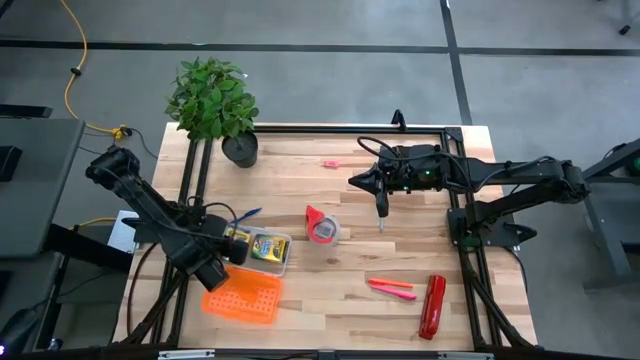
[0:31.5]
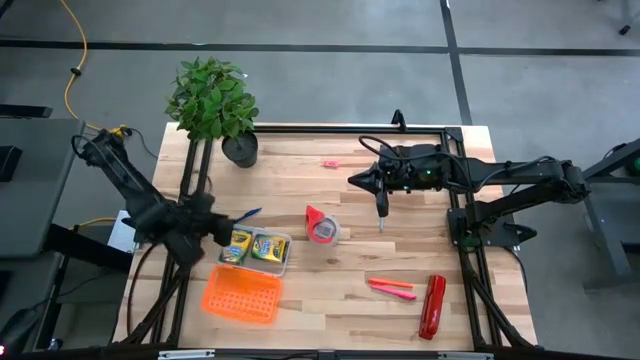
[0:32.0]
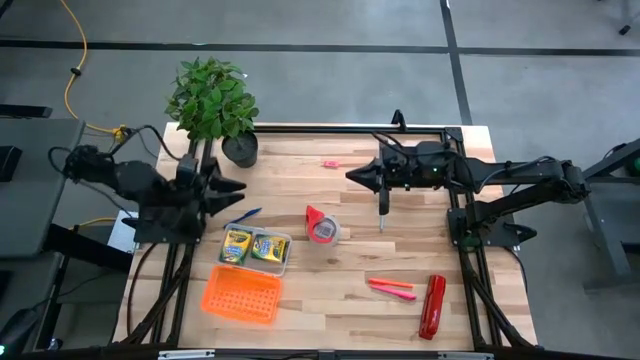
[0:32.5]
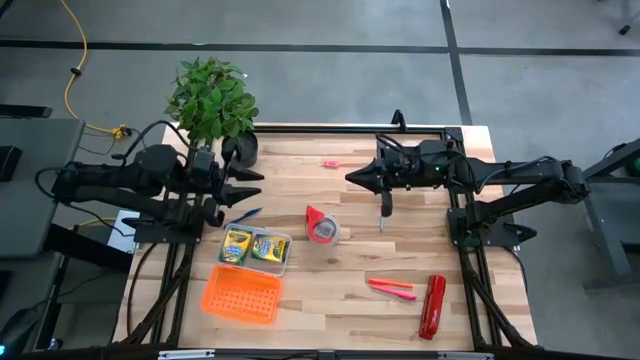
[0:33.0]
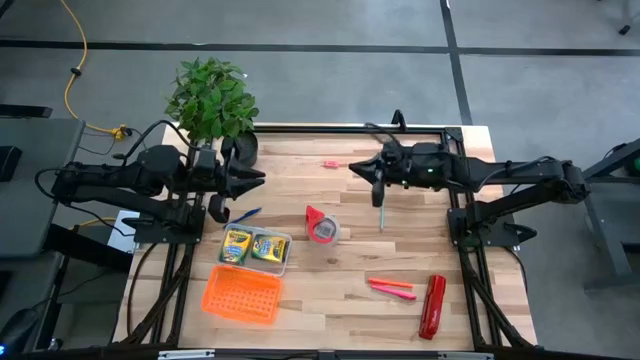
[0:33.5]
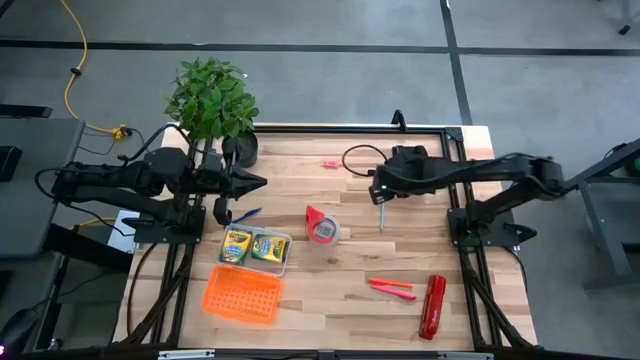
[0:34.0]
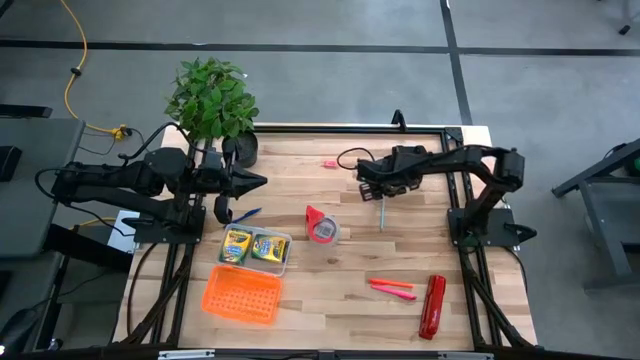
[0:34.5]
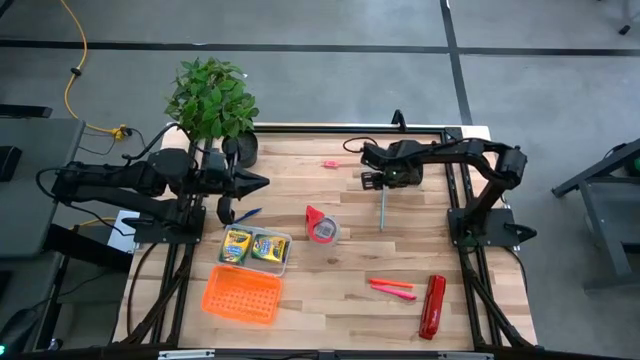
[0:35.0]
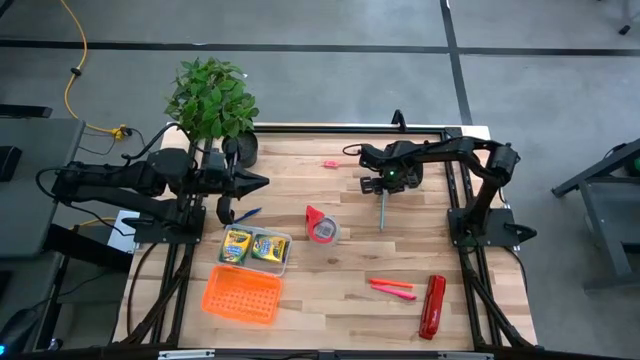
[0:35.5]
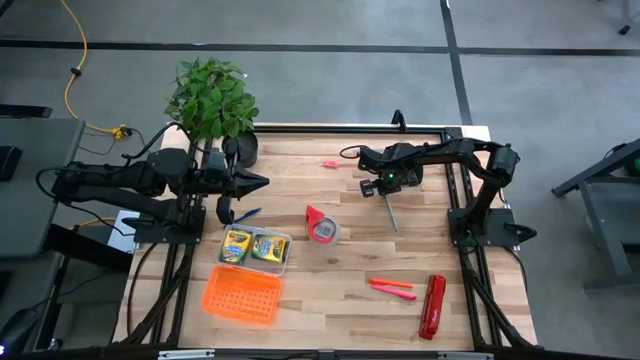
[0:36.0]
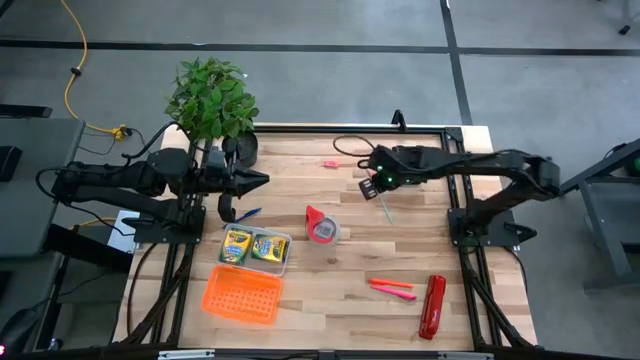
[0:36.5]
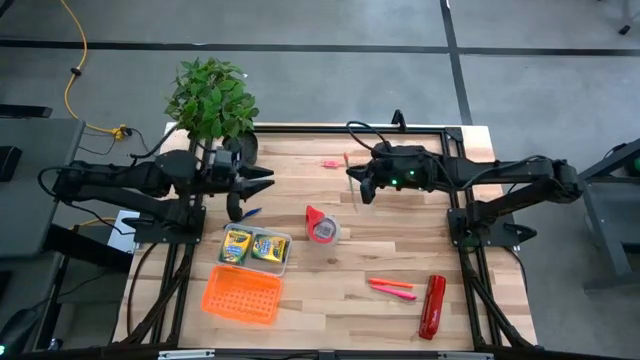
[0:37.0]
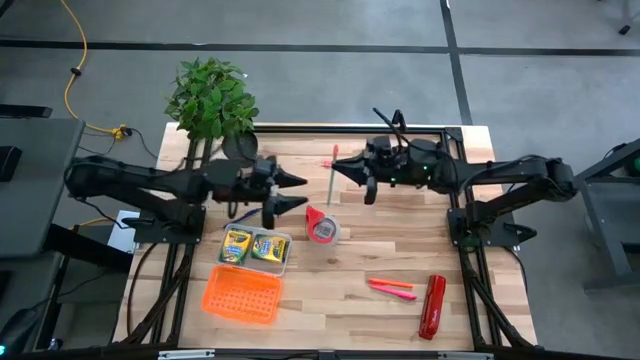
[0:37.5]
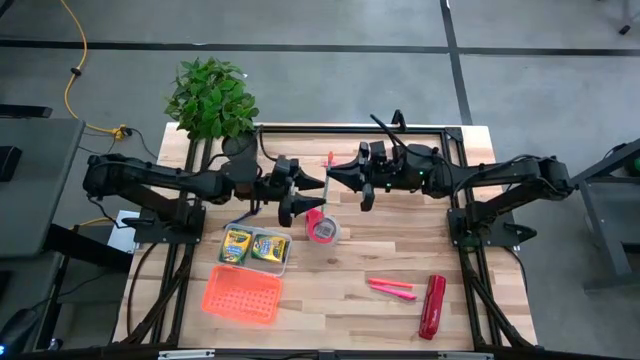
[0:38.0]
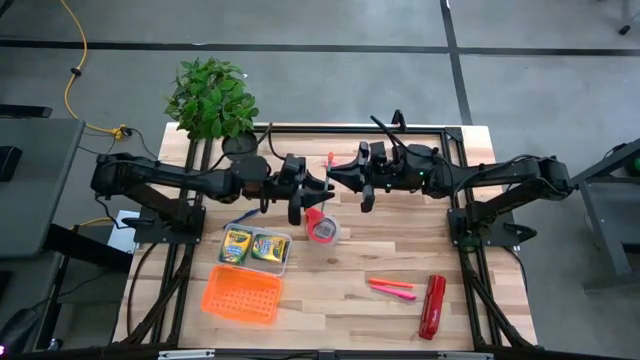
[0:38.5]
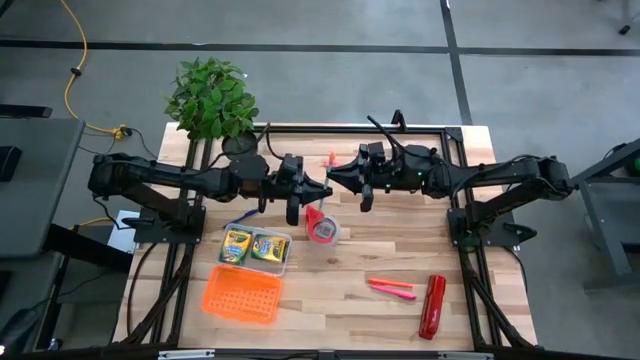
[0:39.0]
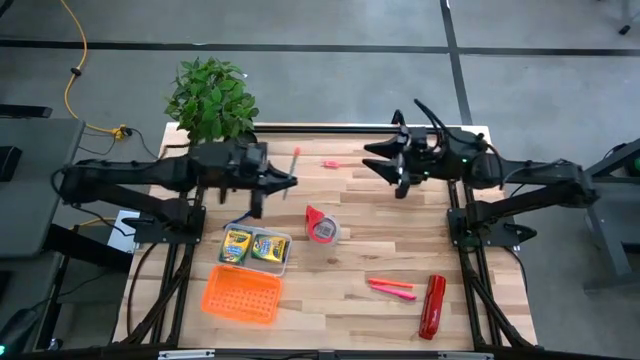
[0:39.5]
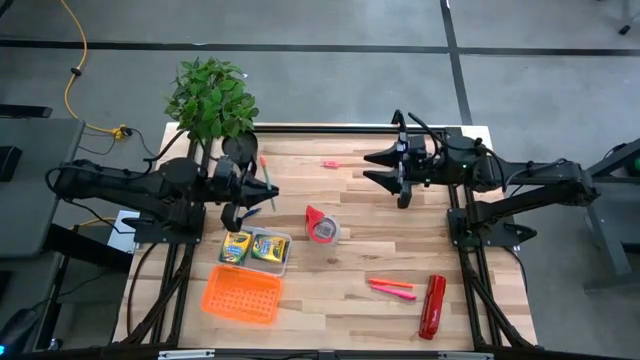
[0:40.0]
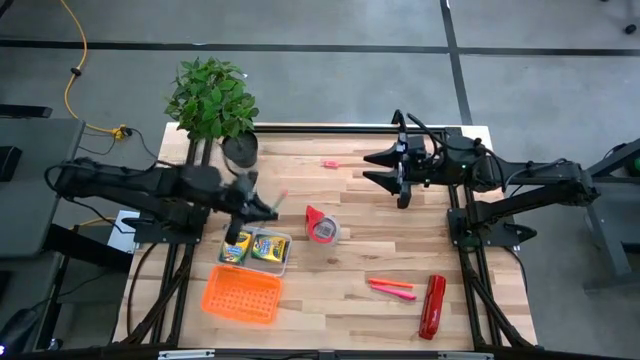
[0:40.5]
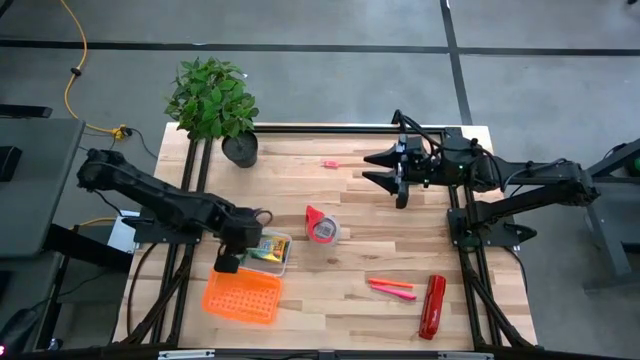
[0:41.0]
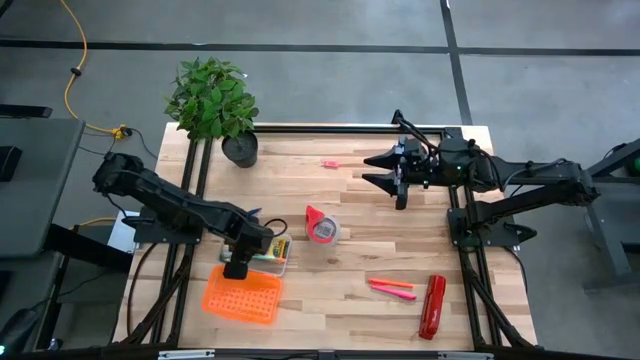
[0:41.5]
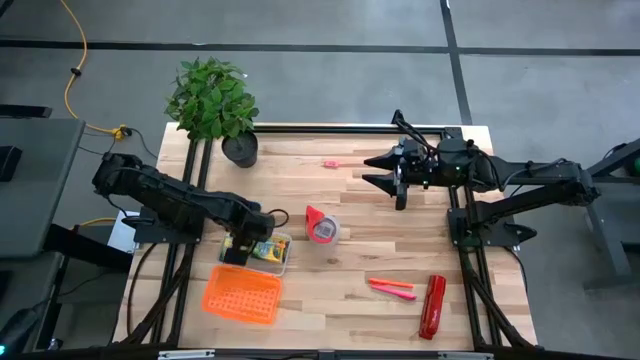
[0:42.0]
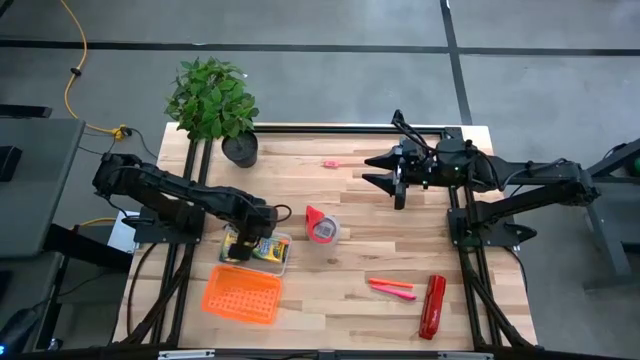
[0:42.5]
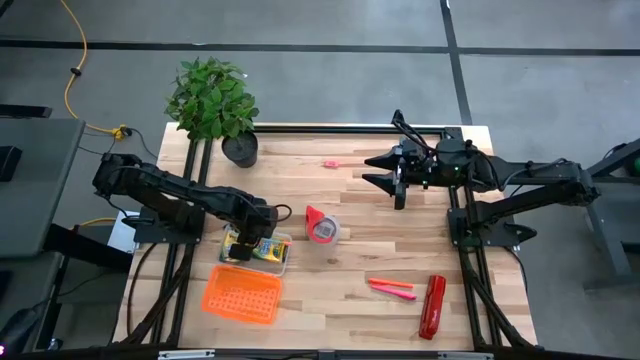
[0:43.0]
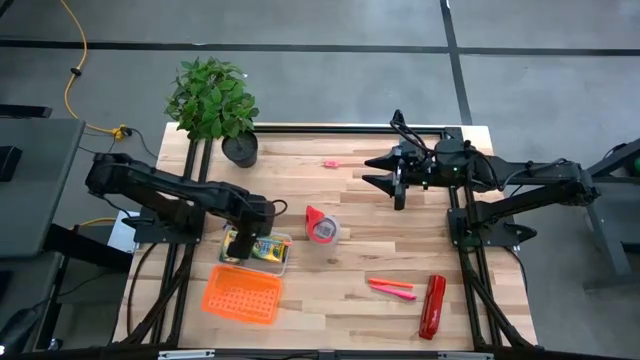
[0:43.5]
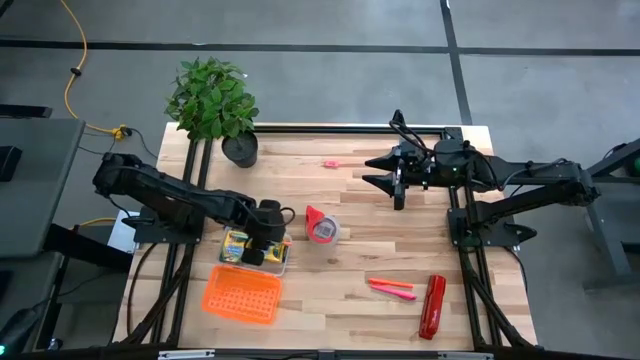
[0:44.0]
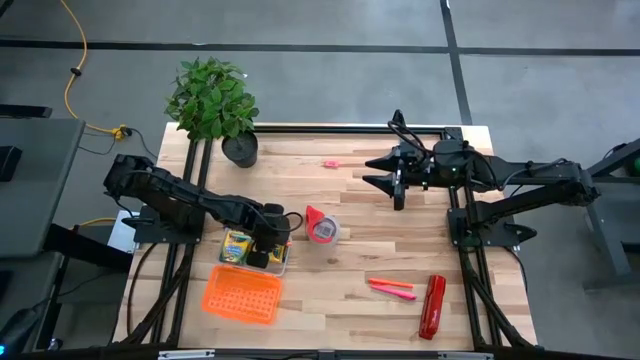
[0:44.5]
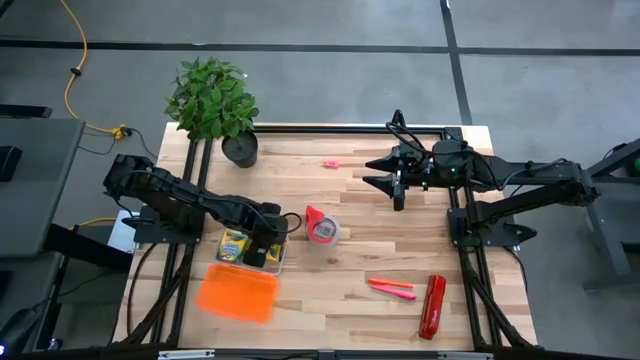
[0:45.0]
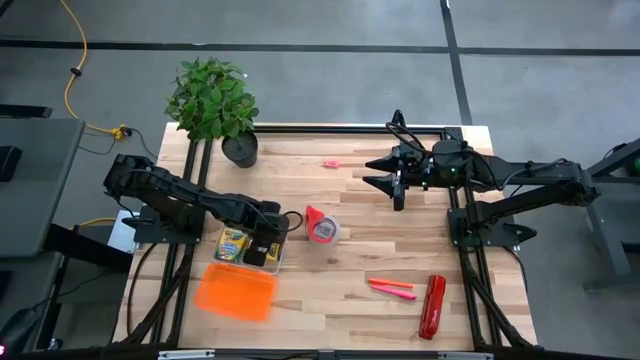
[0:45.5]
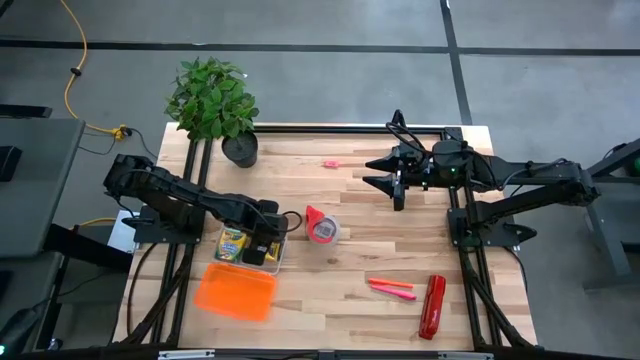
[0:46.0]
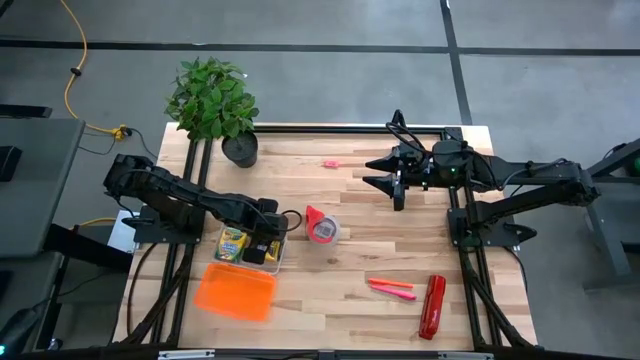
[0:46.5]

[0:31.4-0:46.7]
Task: Pack school essentials
Put the blue pencil into the orange supply box

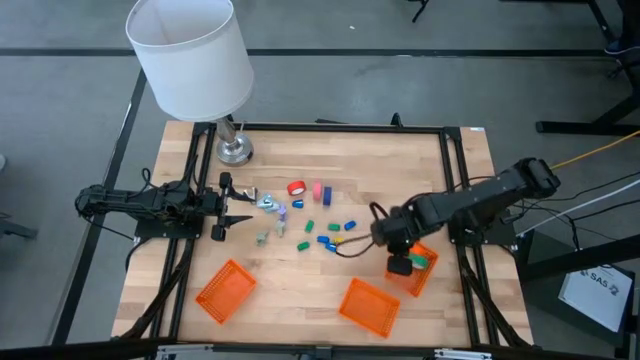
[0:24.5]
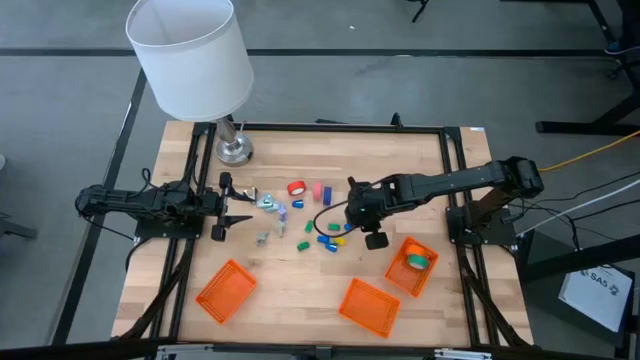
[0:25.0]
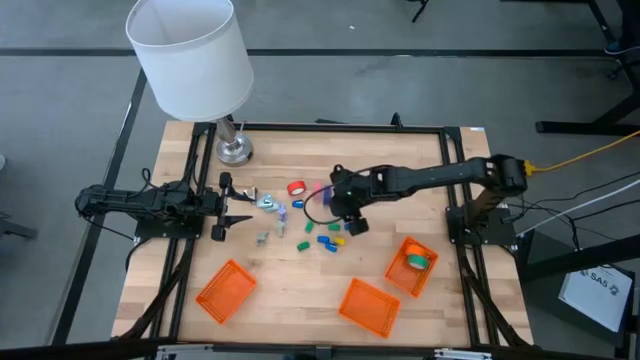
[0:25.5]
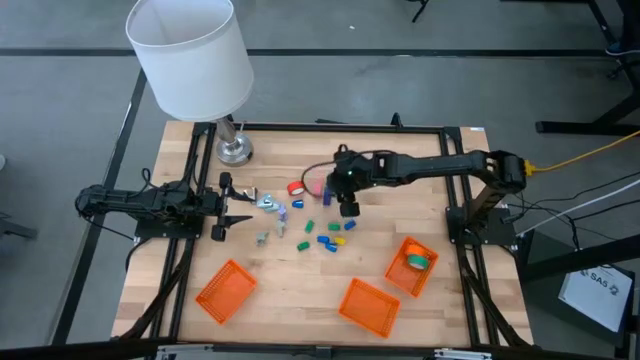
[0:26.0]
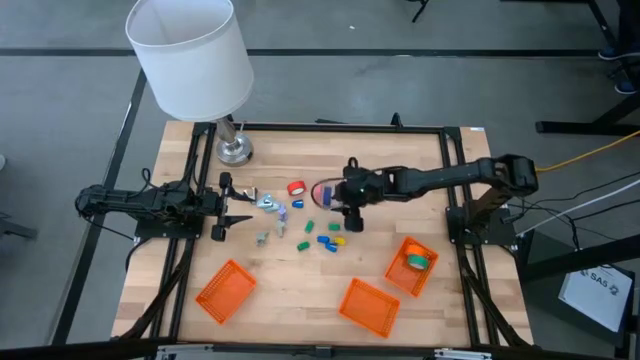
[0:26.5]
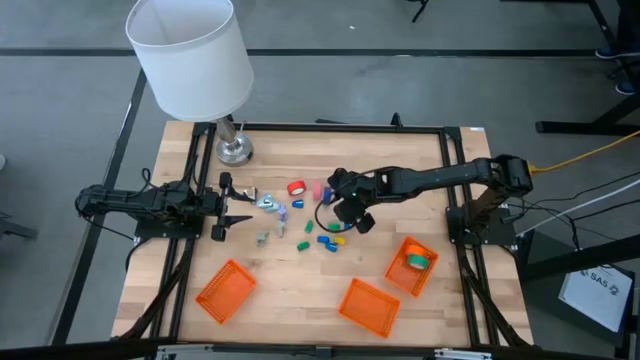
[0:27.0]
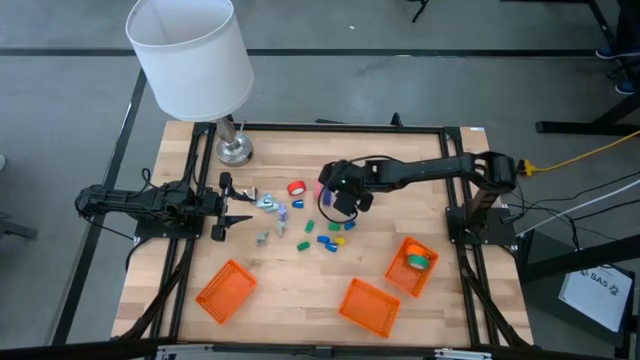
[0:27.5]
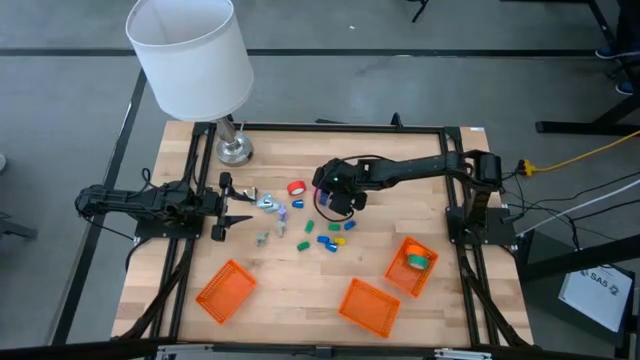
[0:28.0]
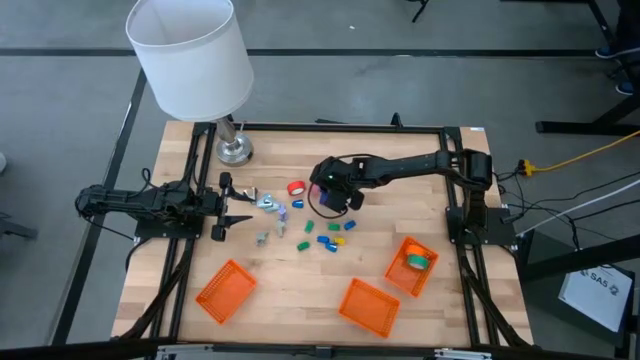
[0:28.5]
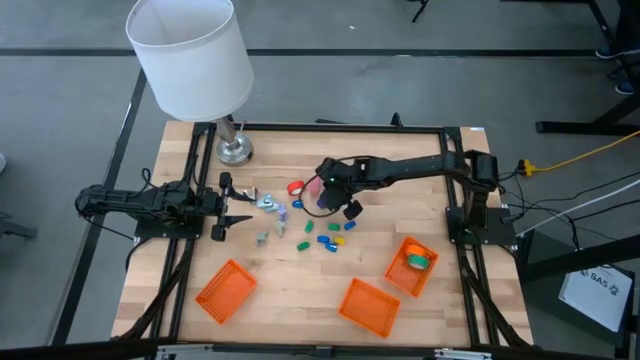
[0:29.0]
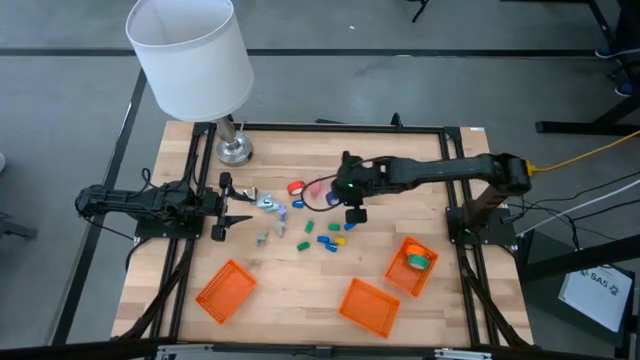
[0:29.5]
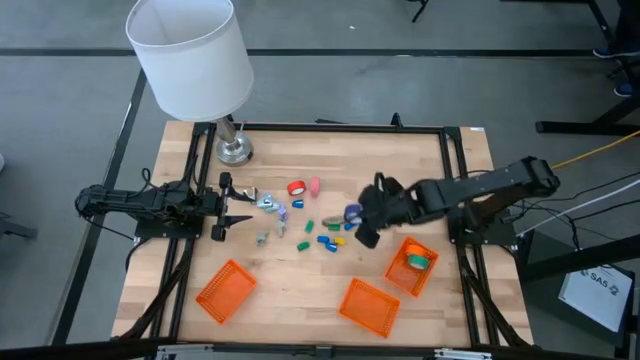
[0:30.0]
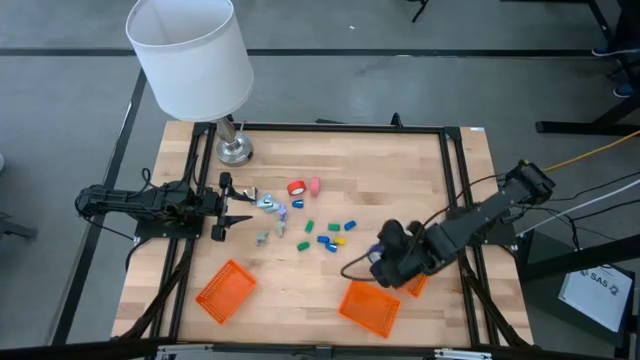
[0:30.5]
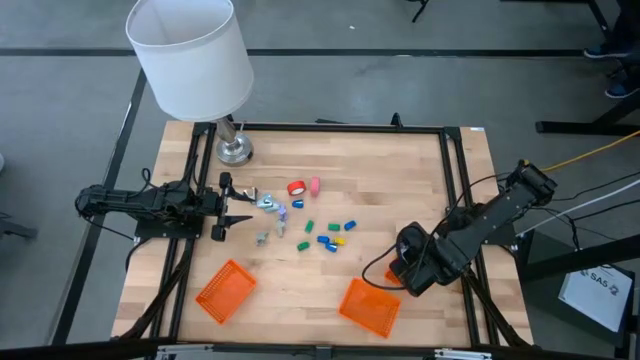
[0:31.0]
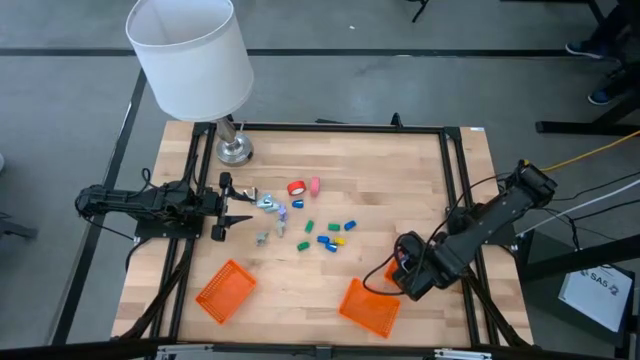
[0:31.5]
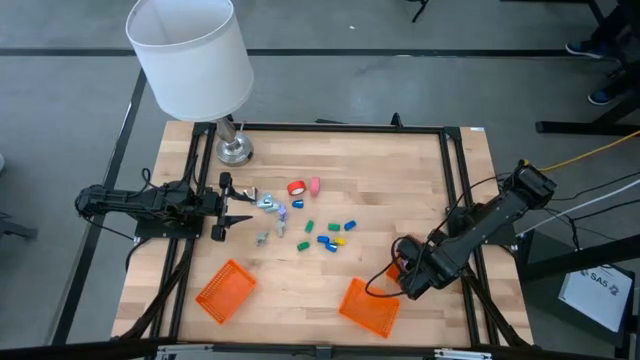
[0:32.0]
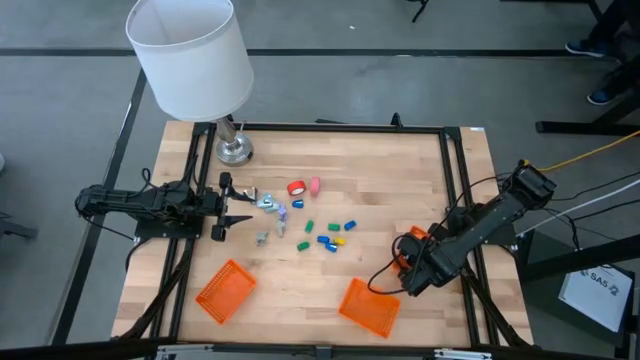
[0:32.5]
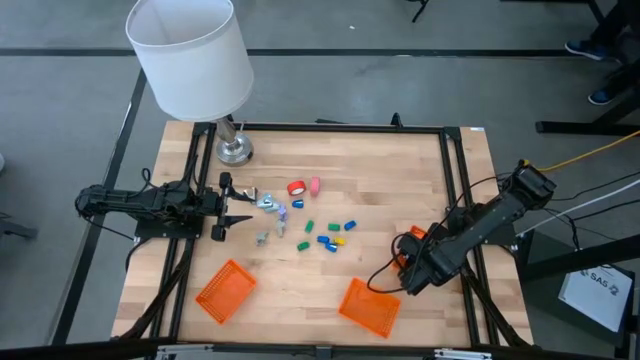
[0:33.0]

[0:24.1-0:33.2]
Task: Pick and place Stapler, Stapler remover, tape
Put the blue tape into the right orange bin
